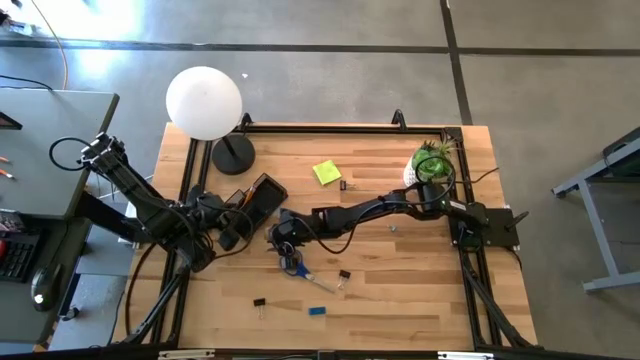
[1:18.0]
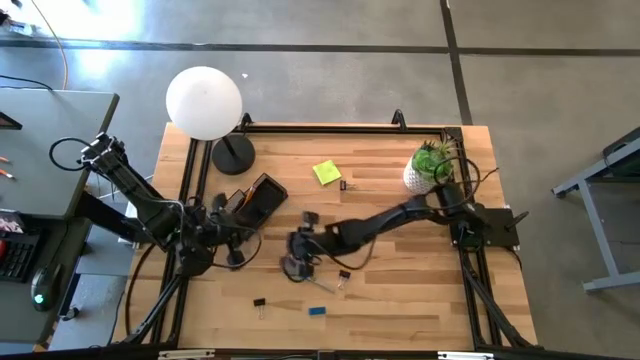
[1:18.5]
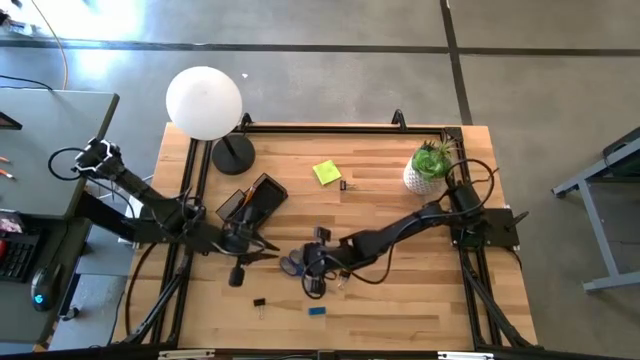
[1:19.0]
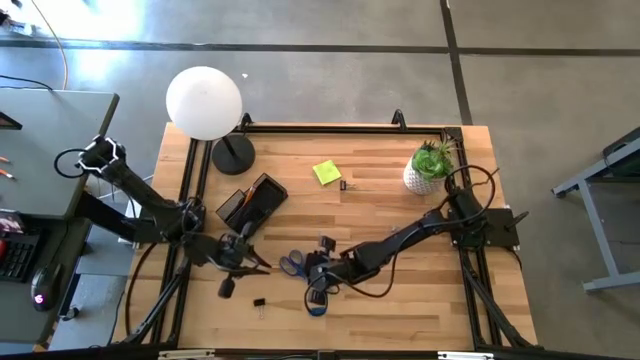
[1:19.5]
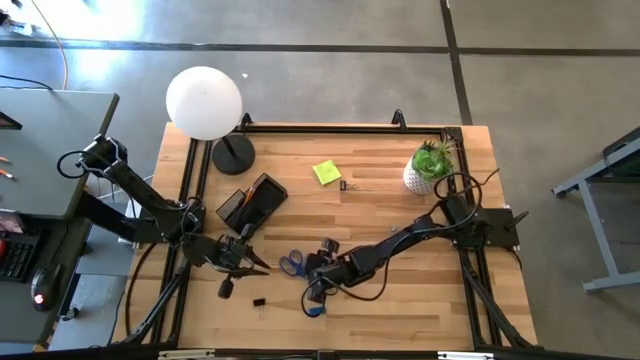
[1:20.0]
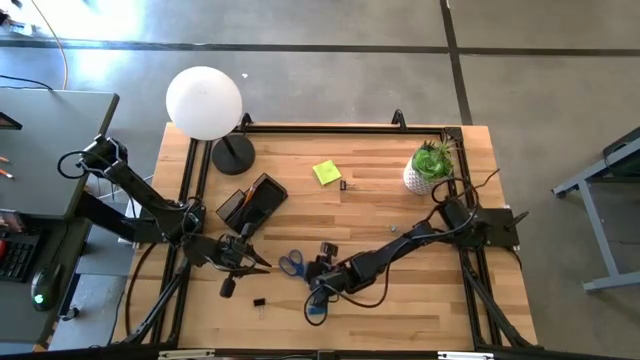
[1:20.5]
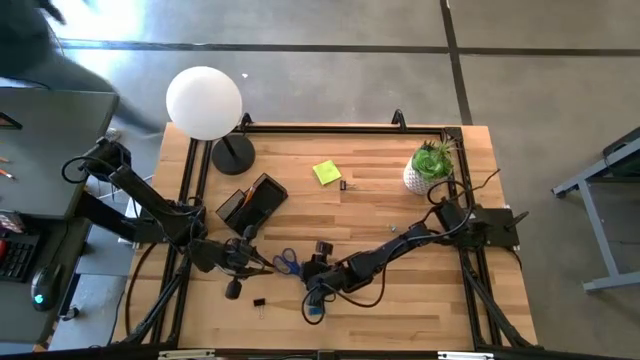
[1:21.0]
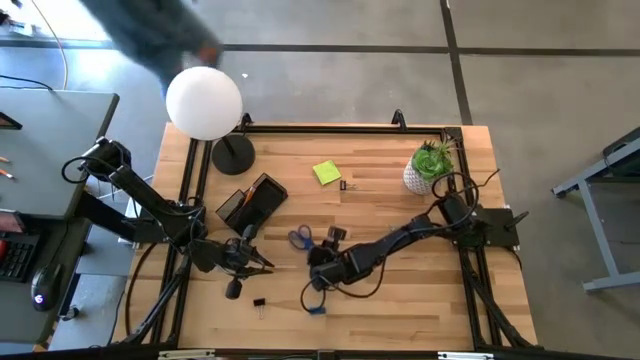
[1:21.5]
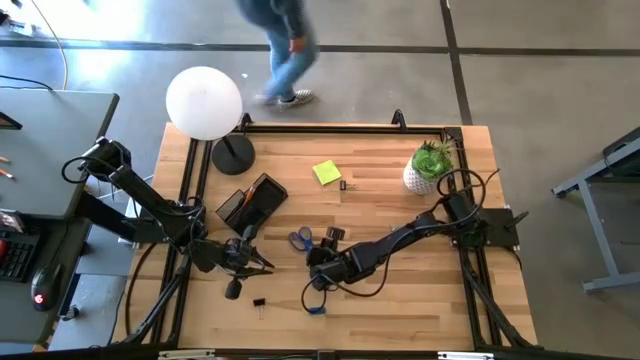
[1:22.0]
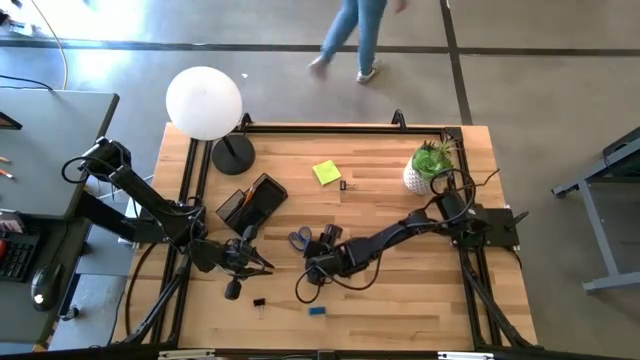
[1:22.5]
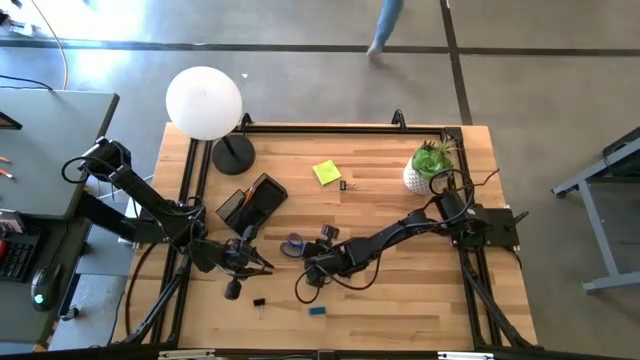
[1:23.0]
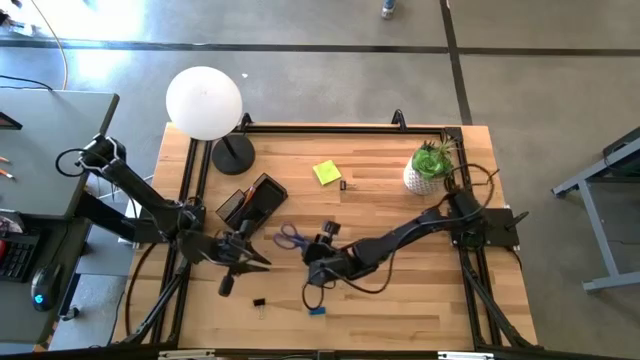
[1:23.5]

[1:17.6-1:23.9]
Task: Pick and place office supplies into organizer
Put the blue scissor into the black mesh desk organizer

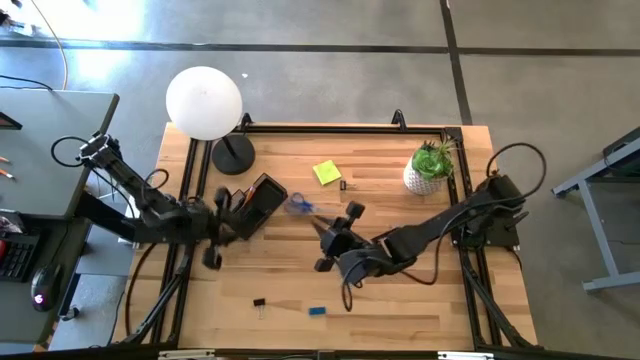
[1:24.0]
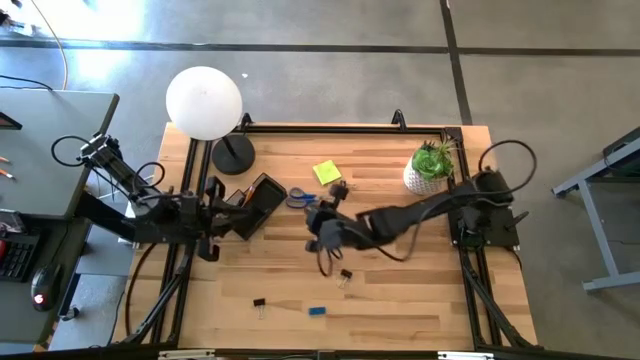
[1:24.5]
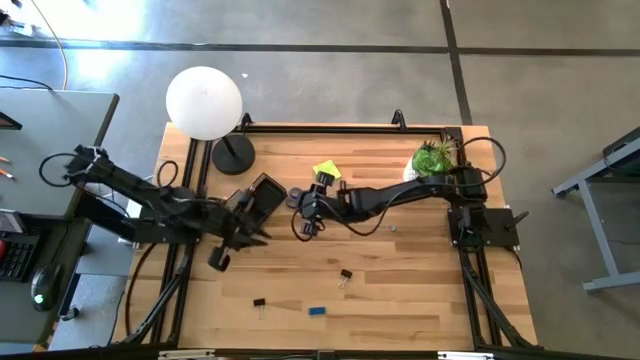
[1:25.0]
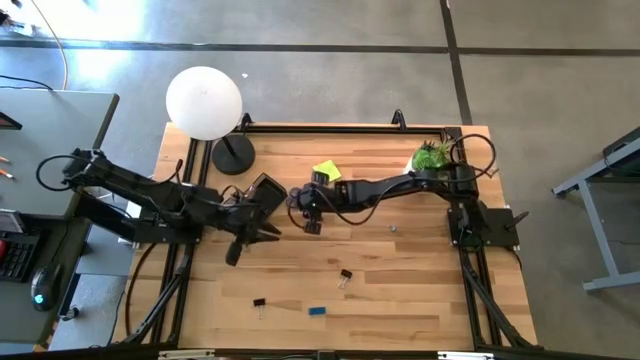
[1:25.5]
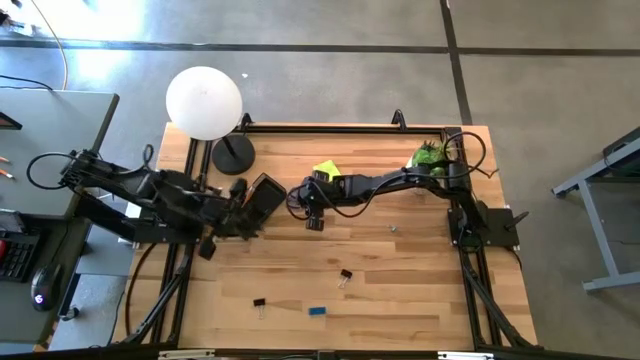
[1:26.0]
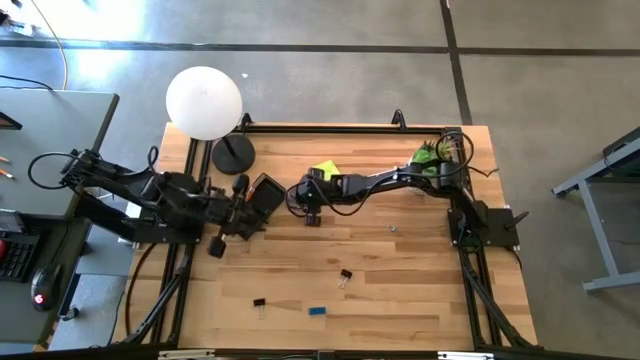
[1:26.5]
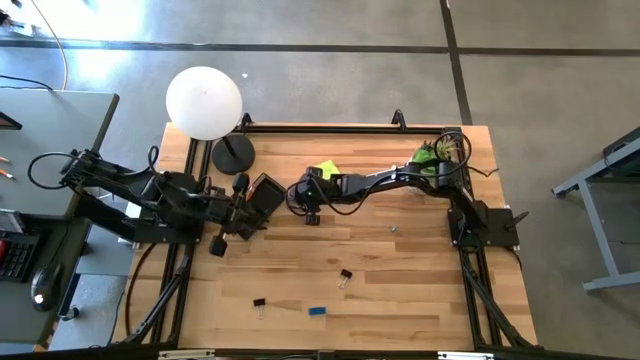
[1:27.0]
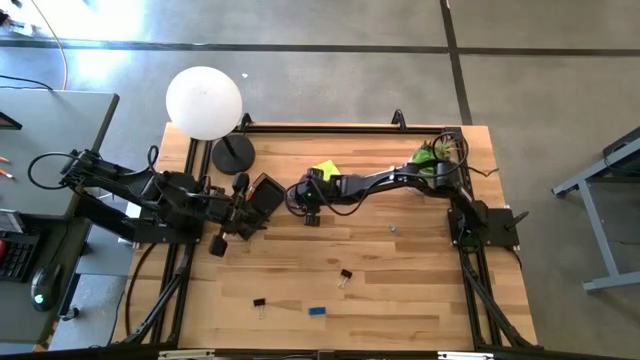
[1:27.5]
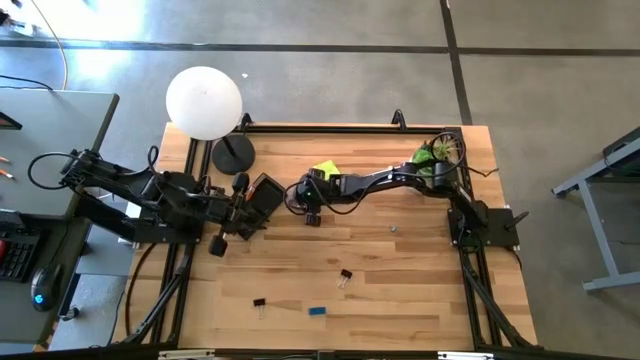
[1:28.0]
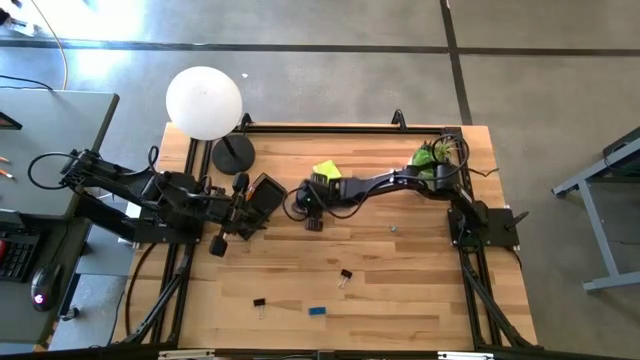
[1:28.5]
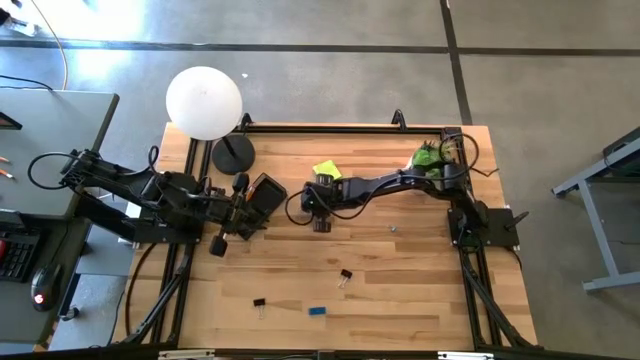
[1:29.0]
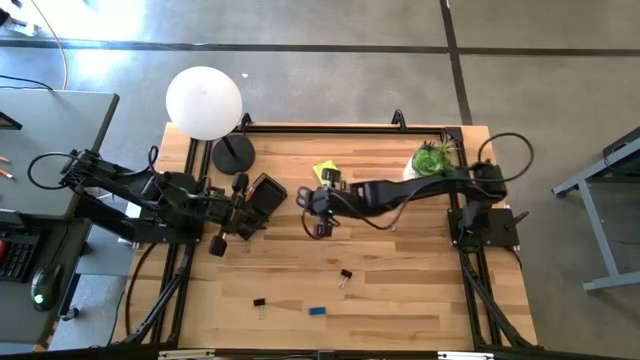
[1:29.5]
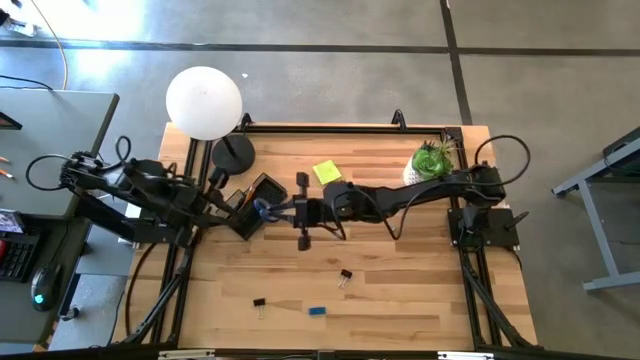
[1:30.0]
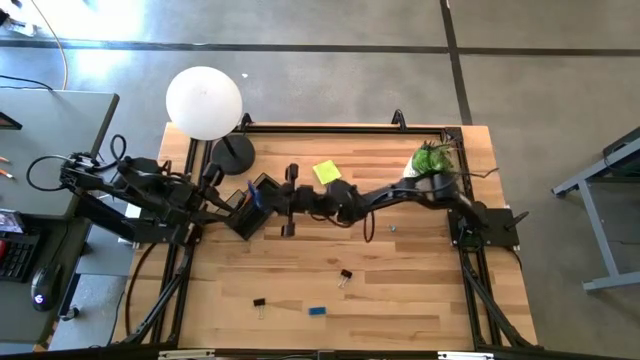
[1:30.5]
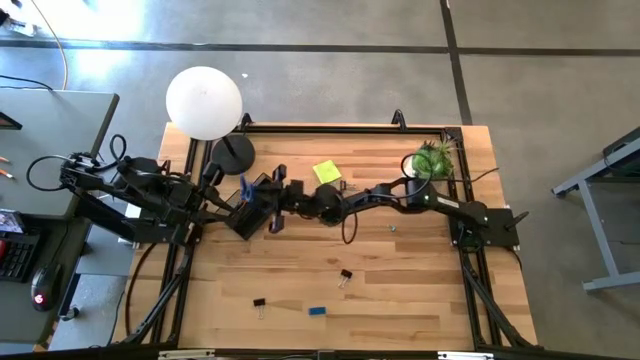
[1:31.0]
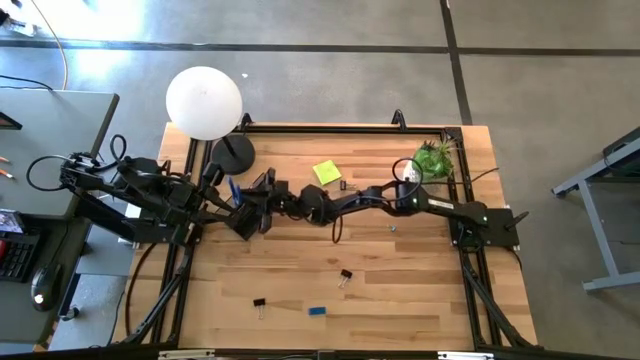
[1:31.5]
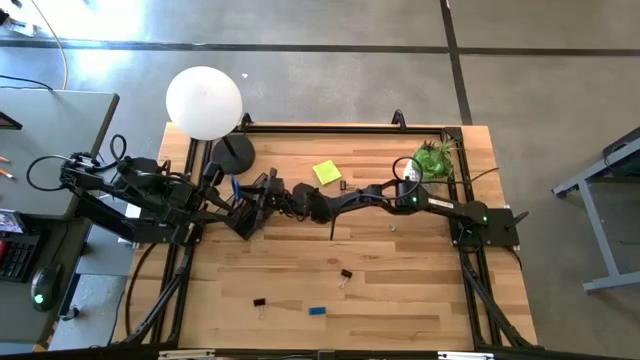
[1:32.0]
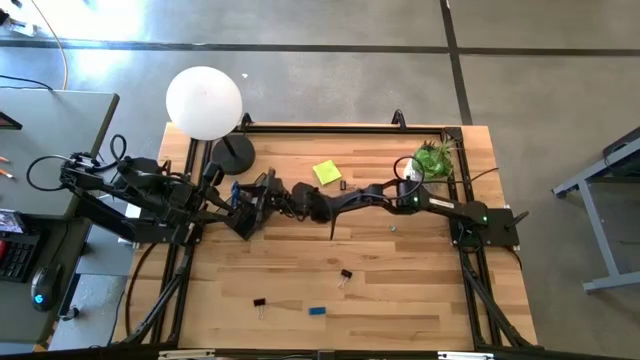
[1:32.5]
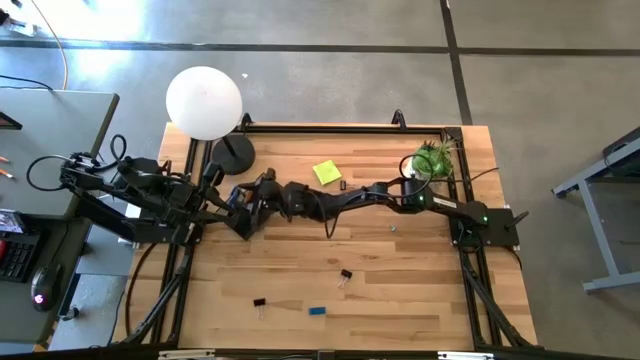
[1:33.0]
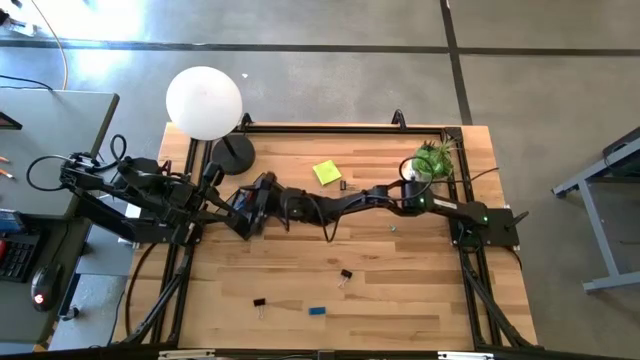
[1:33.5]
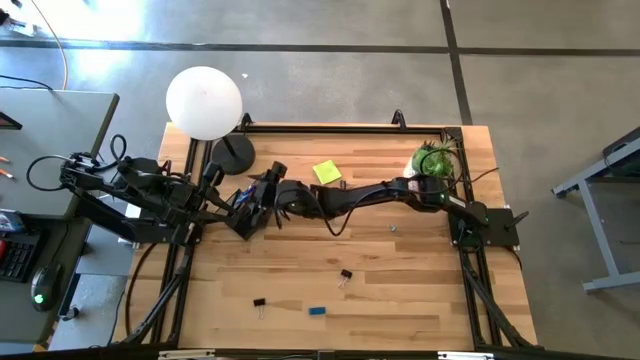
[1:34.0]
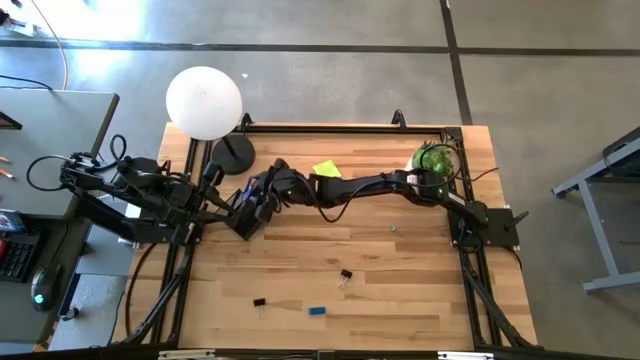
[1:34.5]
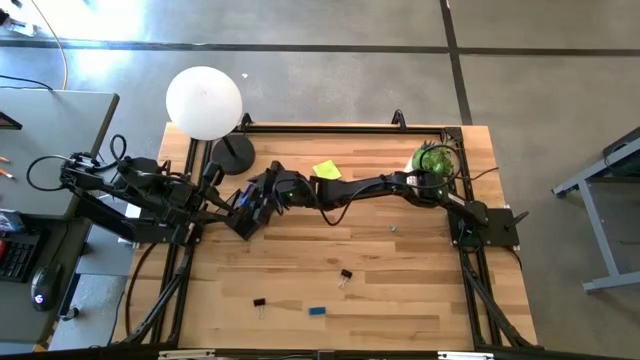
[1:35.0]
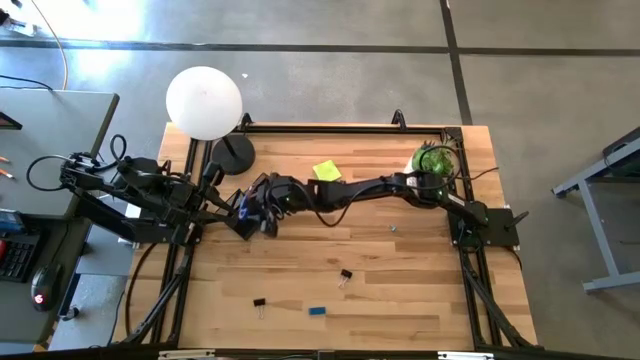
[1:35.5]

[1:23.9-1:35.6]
Put the blue scissor into the black mesh desk organizer

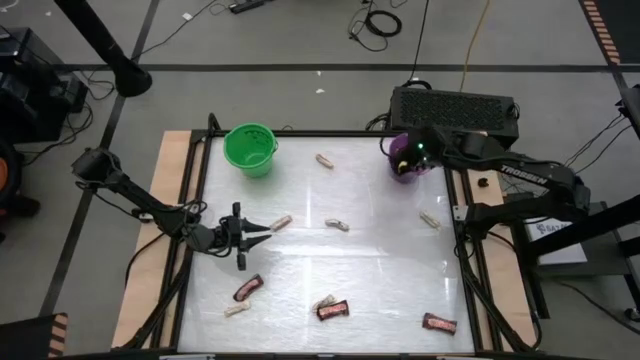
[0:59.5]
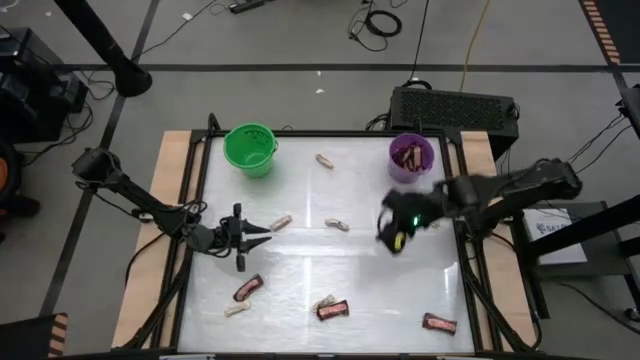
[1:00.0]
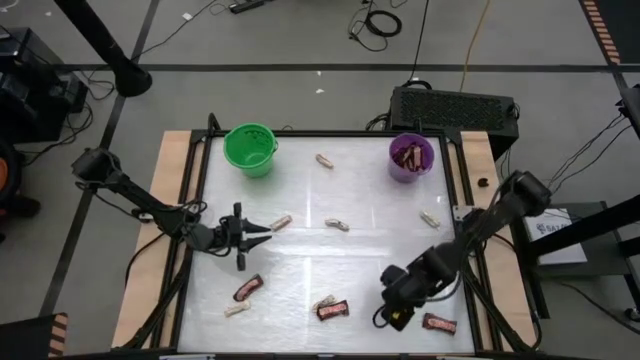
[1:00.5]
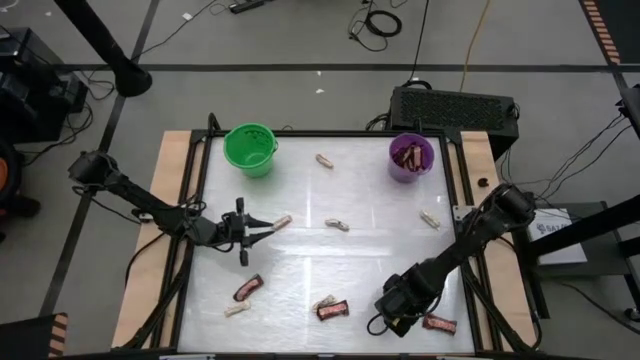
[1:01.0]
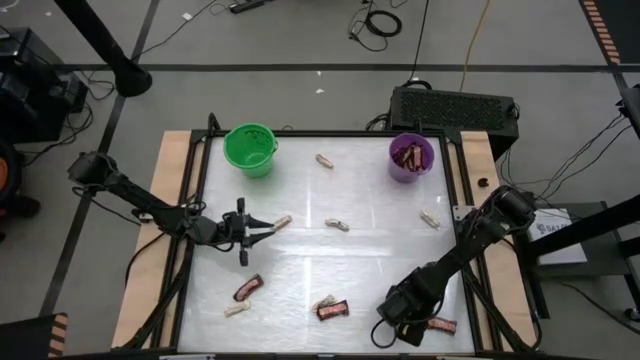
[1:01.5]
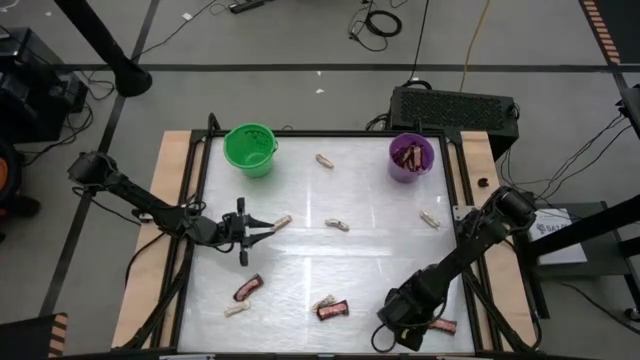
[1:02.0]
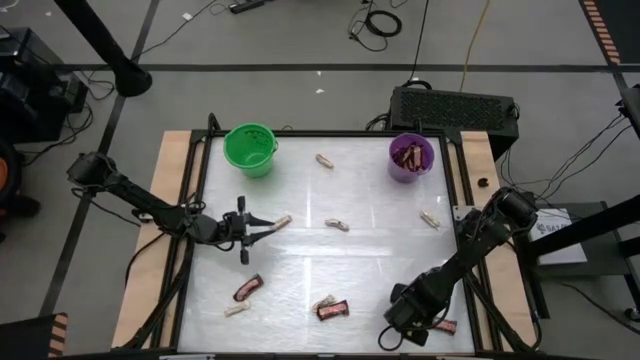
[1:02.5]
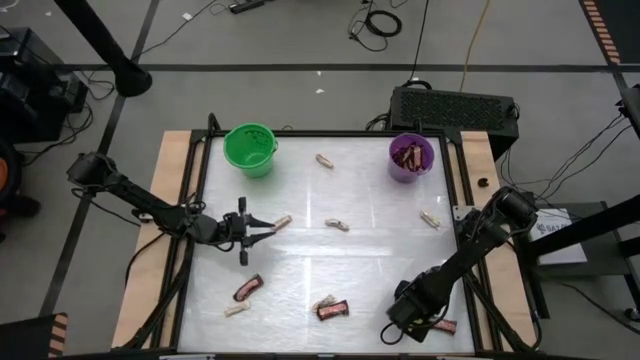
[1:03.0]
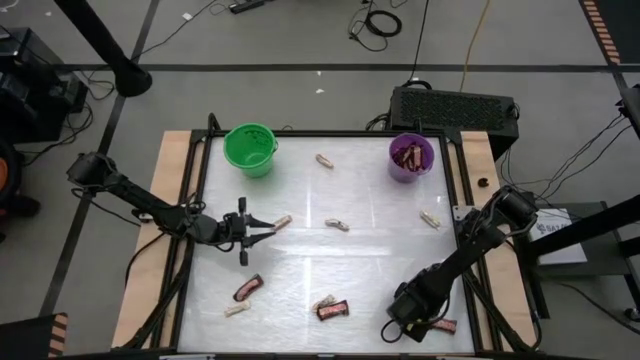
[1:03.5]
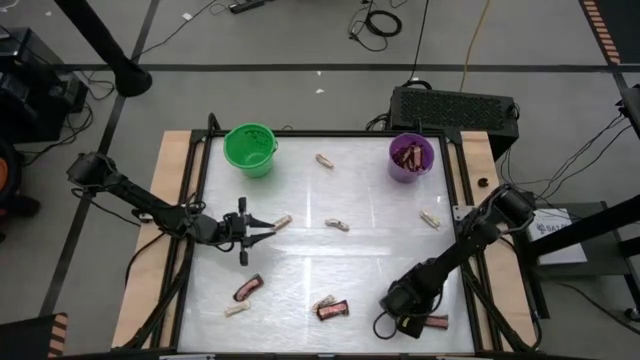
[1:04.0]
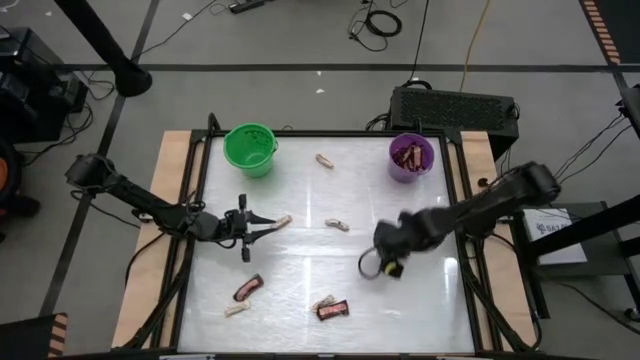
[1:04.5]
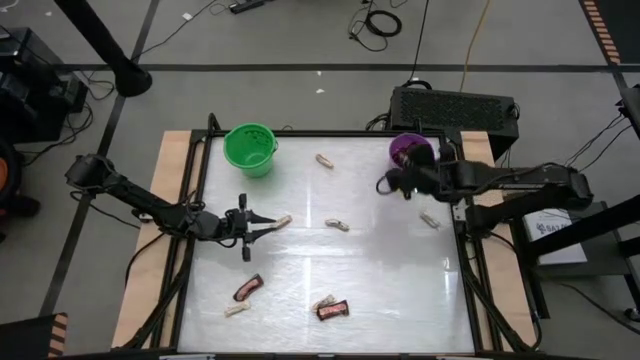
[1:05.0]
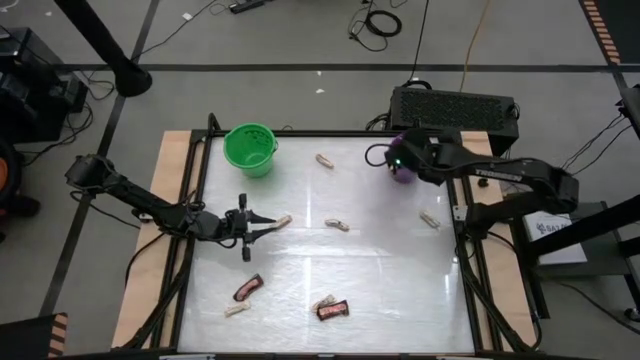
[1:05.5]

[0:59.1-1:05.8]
Task: Sort candy by brand, put in halloween buckets
Put the brown chocolate bar into the purple bucket
